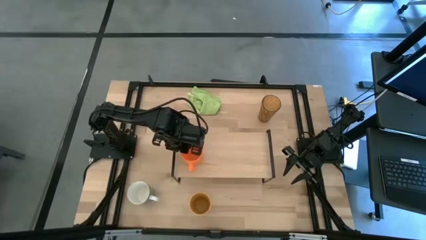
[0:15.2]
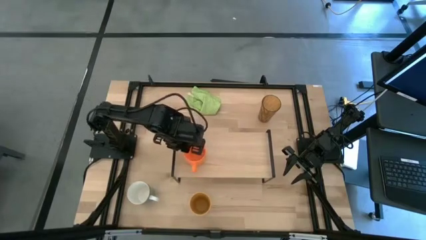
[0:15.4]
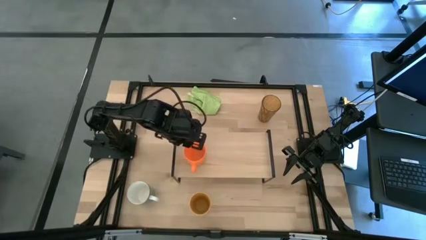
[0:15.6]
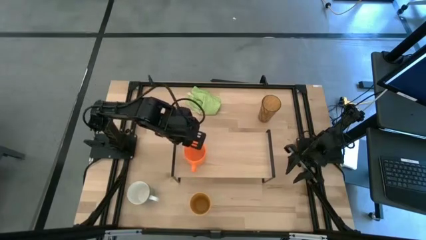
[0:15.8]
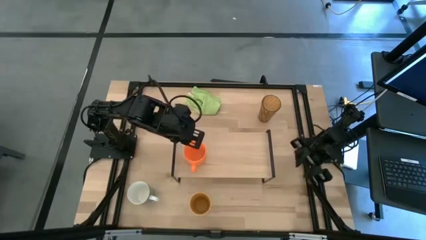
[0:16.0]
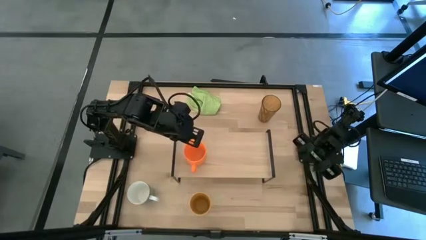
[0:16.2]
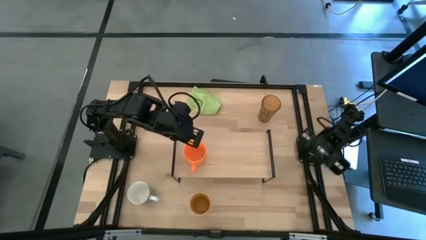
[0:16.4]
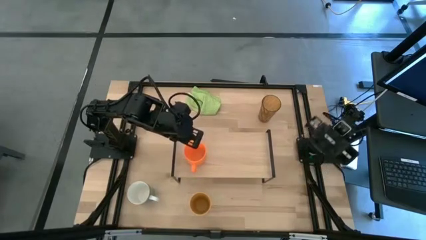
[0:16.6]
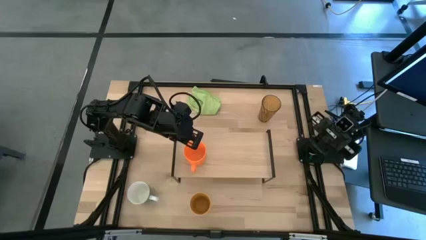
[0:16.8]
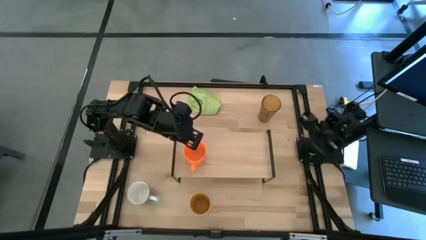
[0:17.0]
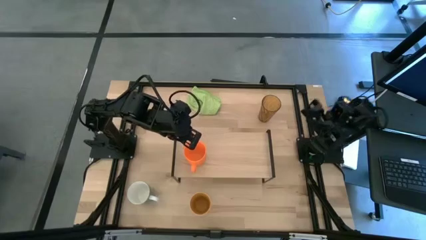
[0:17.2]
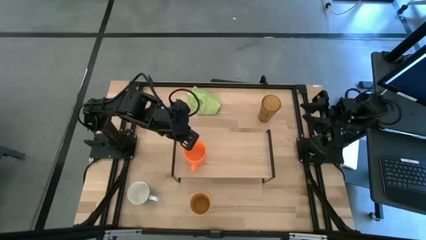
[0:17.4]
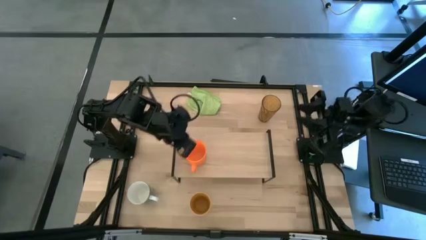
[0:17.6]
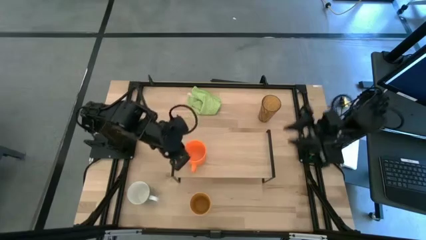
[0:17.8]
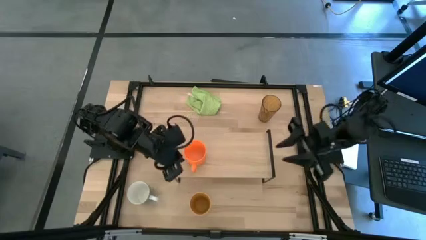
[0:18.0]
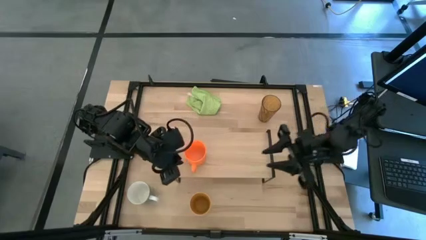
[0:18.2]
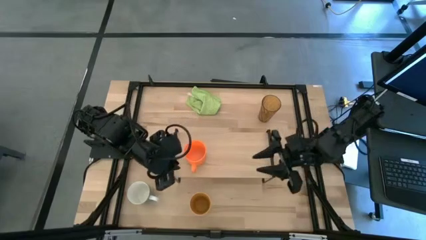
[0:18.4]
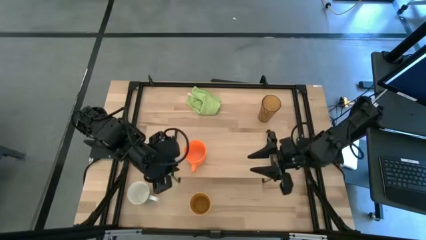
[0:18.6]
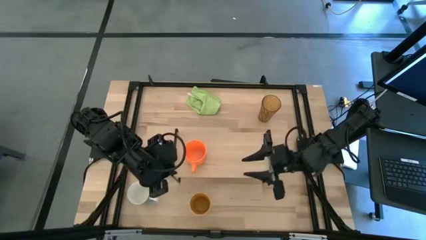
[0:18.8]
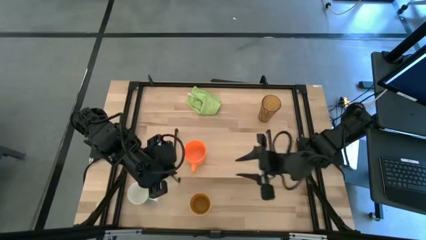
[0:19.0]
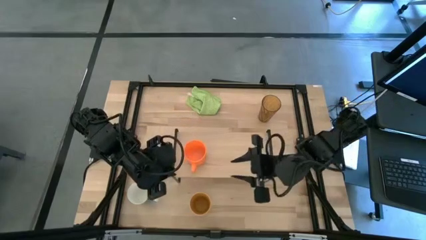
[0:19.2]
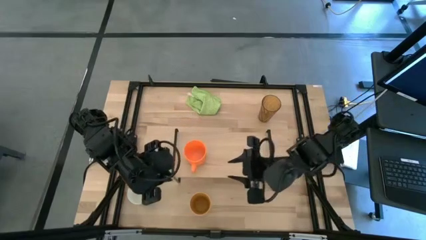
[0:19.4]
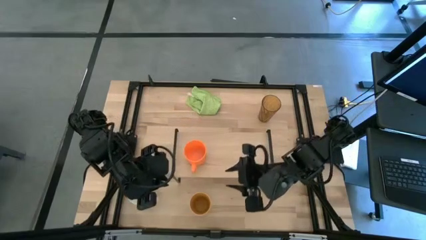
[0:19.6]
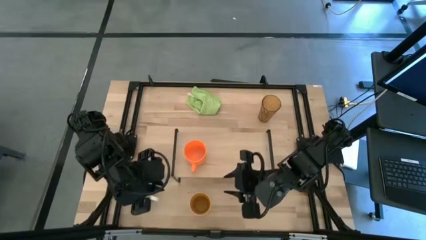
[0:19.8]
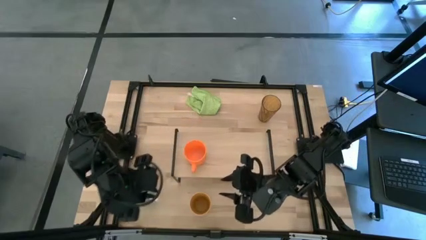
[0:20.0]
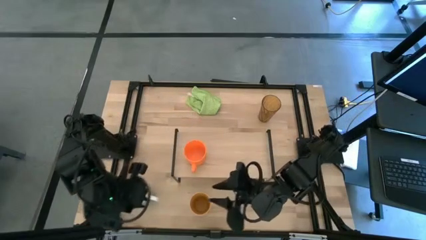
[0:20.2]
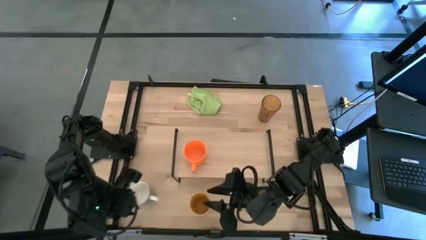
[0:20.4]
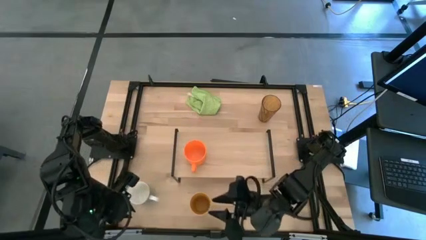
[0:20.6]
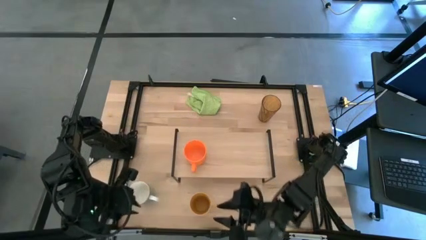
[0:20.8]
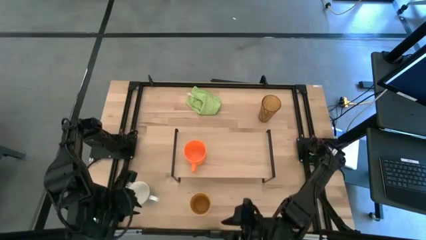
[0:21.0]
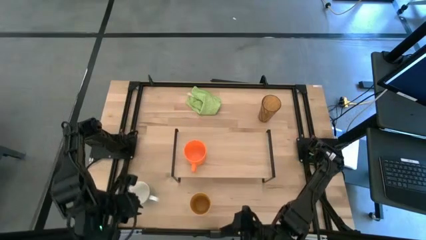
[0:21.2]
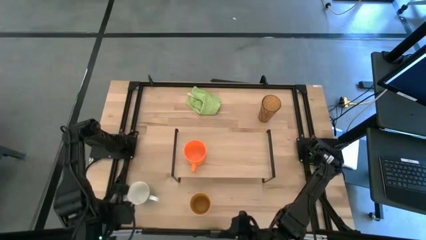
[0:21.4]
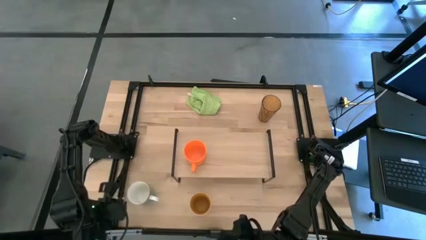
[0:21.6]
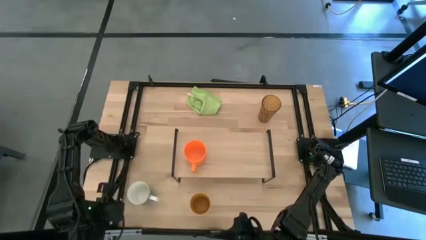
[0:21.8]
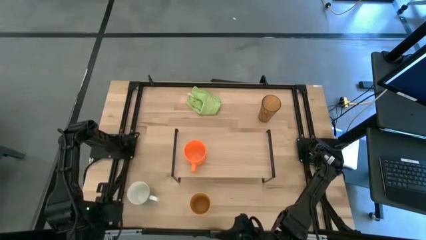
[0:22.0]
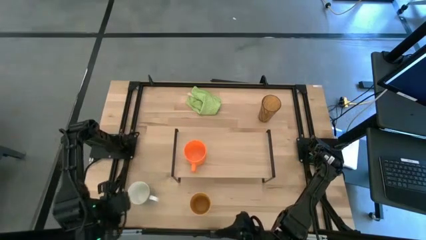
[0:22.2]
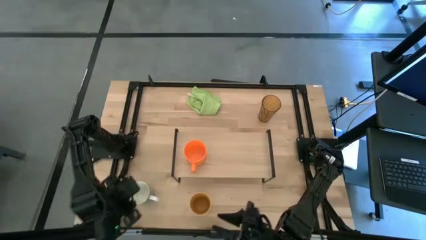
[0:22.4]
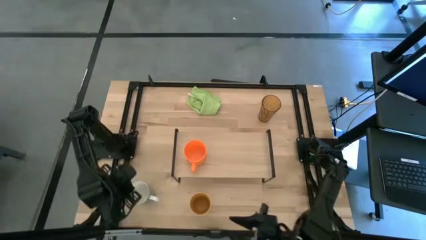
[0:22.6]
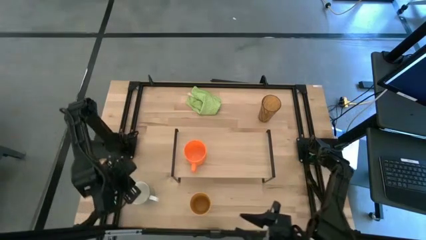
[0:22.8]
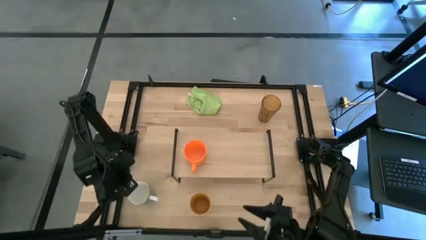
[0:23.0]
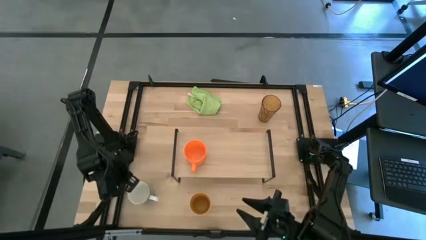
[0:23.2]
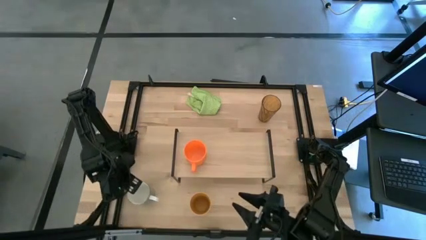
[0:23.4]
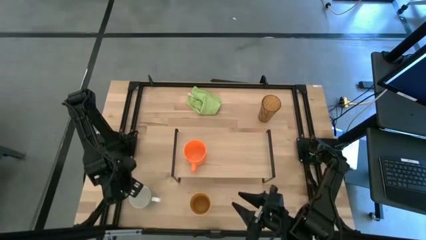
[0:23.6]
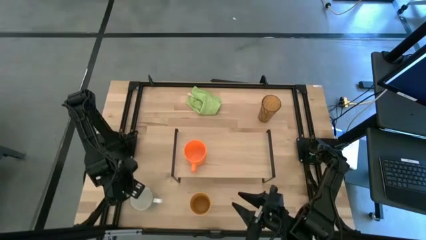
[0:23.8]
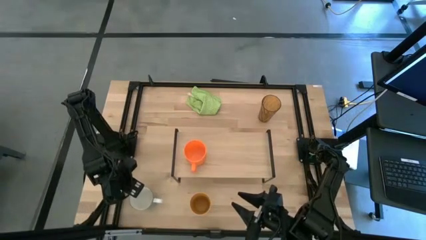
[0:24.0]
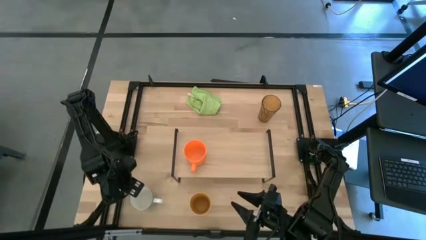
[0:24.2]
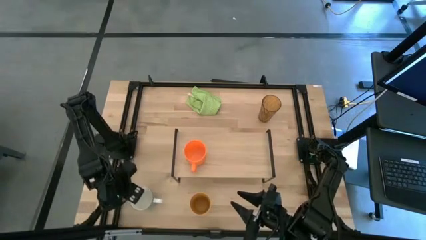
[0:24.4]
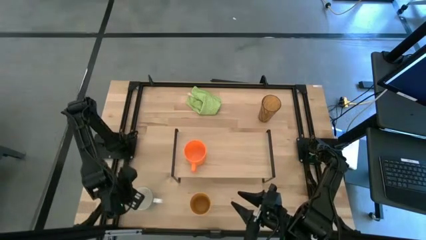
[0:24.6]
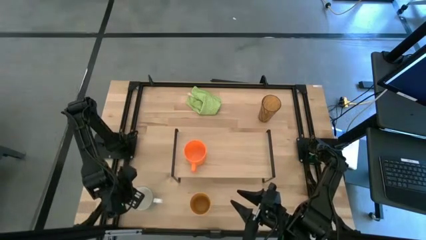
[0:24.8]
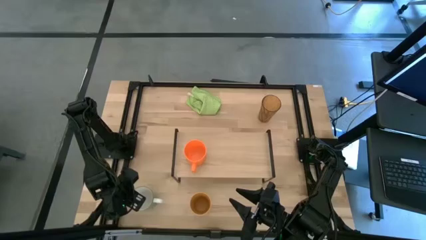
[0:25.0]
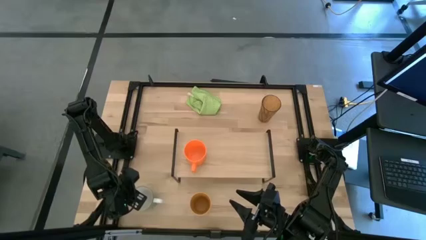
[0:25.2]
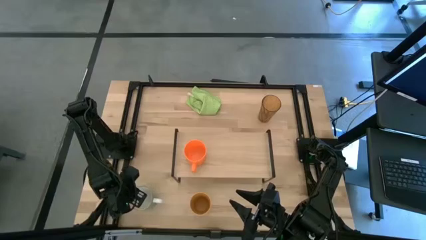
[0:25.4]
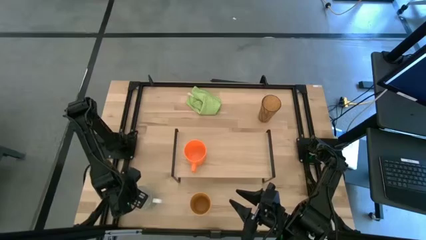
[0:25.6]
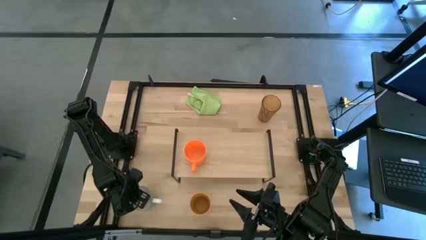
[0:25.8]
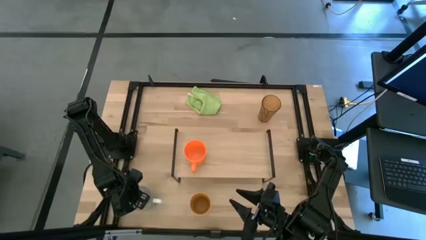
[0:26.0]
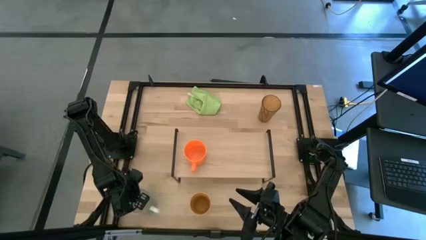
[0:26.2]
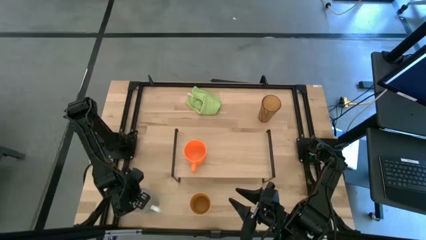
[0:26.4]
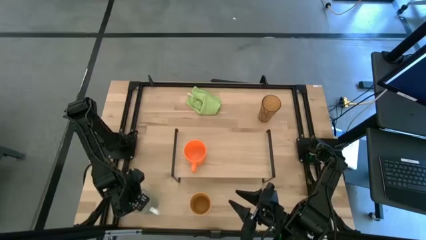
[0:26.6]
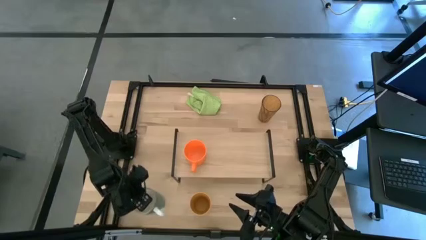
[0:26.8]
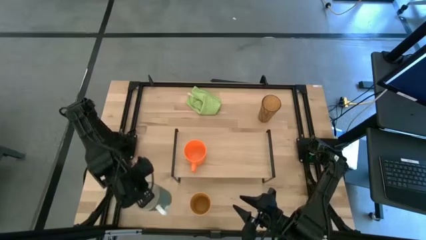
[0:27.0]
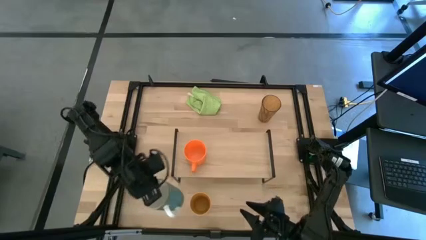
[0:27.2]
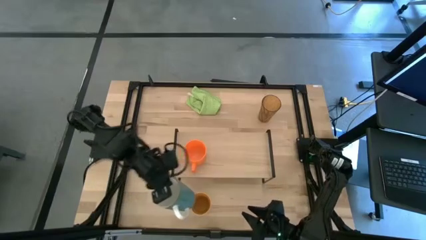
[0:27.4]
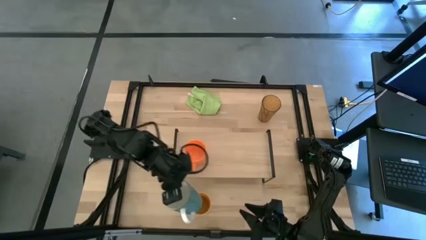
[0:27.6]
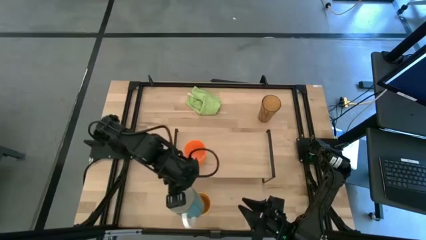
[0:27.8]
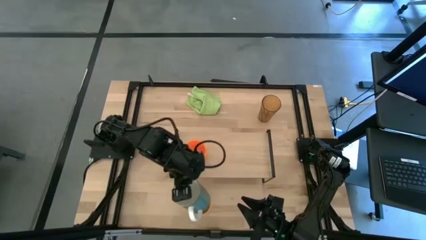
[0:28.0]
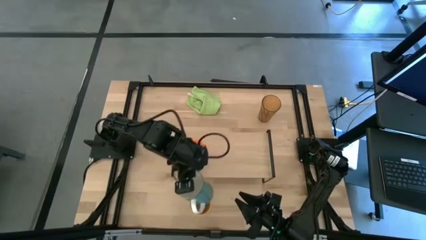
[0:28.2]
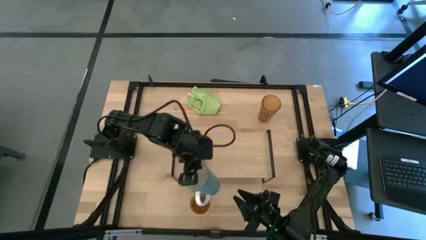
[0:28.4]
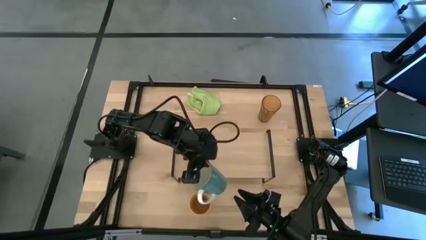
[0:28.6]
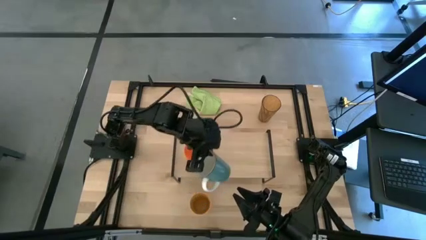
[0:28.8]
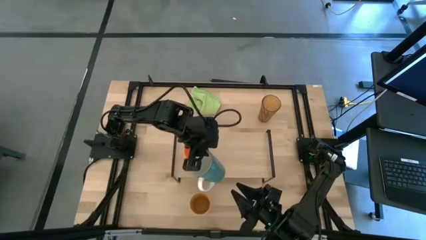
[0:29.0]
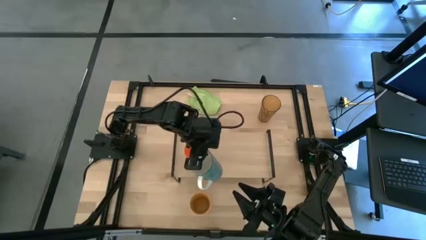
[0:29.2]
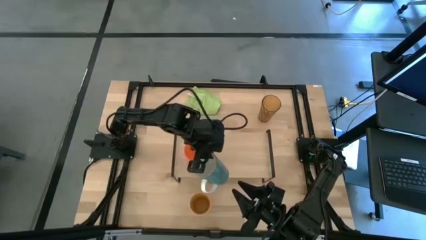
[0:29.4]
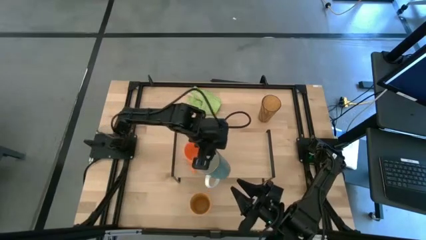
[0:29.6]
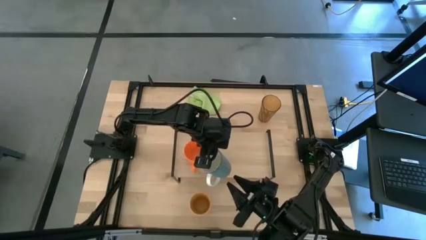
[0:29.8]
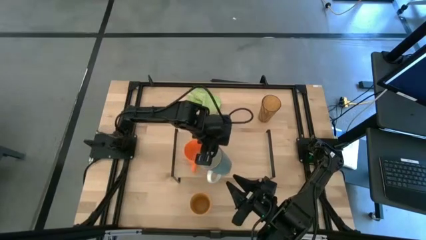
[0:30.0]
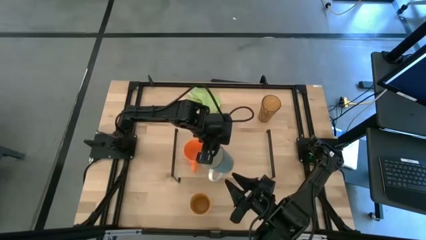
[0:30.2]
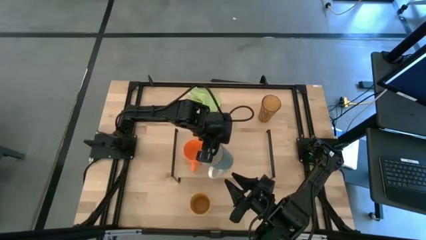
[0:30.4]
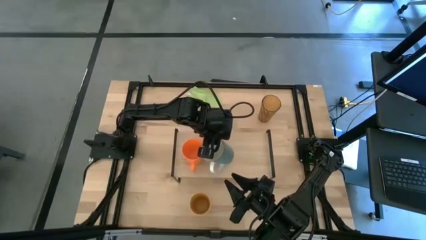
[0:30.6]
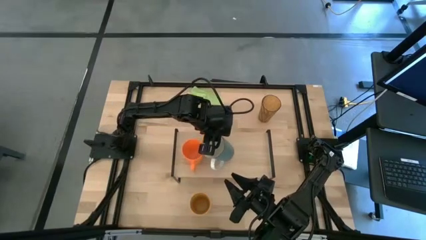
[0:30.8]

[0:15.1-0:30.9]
Task: Stack small to large cups/mugs on shelf
Put the blue mug on the shelf
